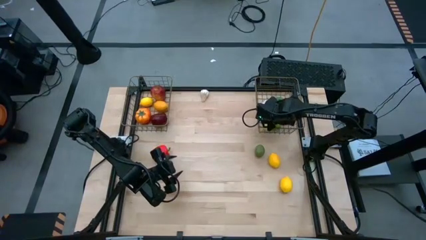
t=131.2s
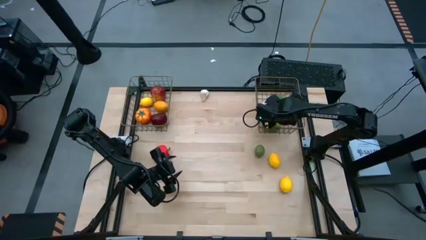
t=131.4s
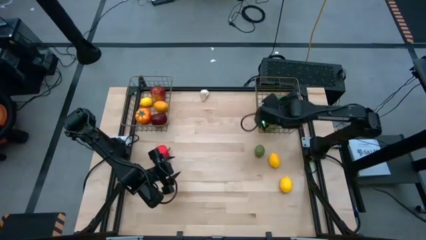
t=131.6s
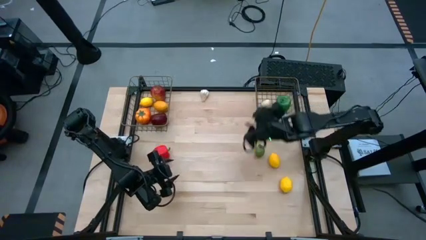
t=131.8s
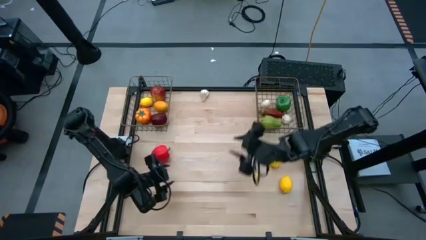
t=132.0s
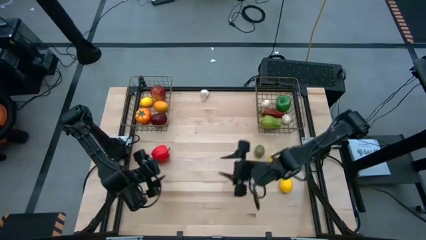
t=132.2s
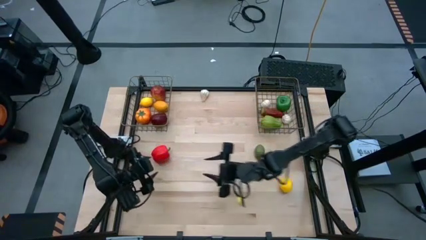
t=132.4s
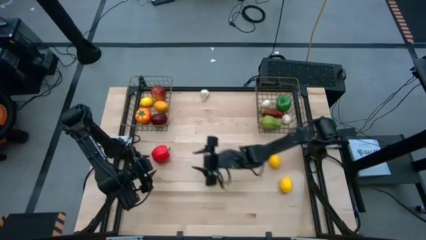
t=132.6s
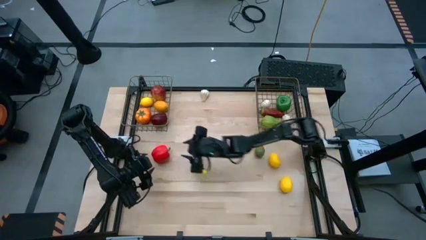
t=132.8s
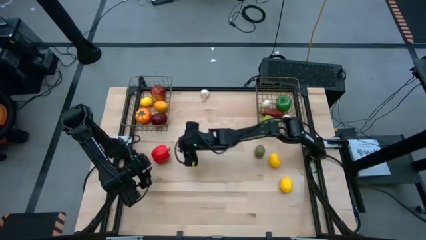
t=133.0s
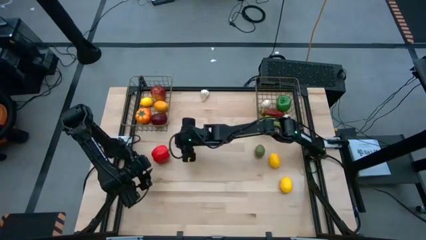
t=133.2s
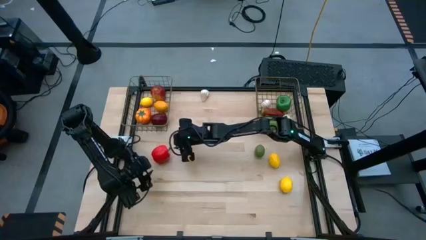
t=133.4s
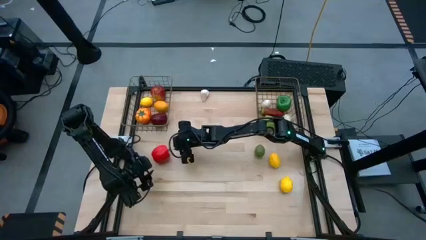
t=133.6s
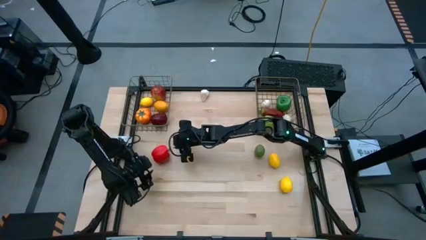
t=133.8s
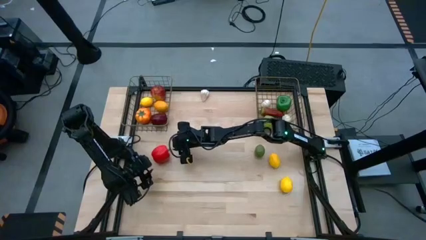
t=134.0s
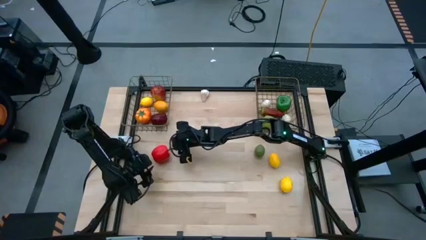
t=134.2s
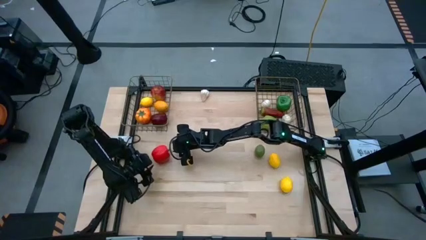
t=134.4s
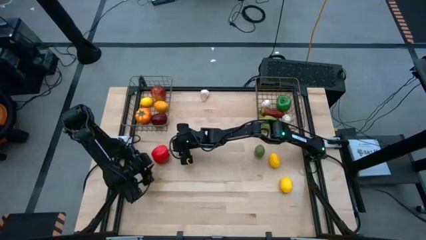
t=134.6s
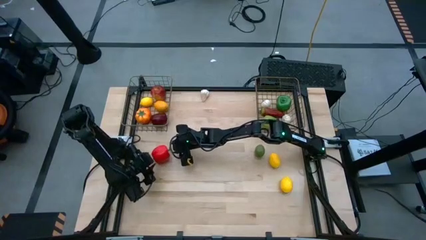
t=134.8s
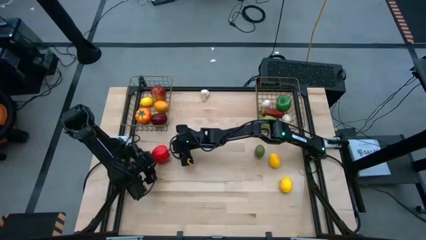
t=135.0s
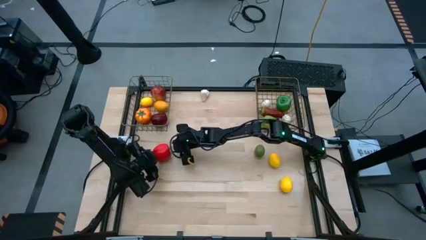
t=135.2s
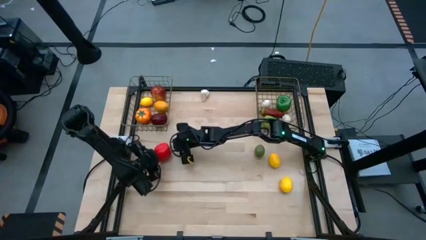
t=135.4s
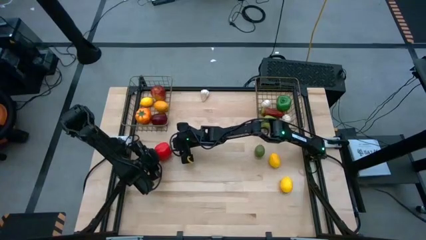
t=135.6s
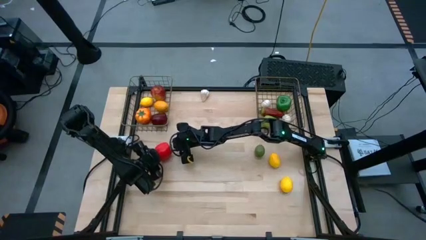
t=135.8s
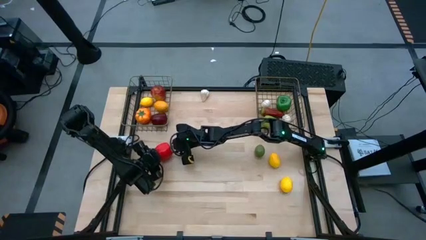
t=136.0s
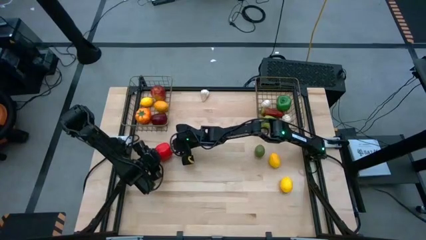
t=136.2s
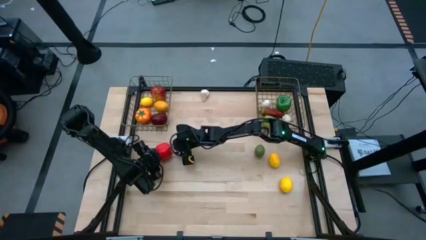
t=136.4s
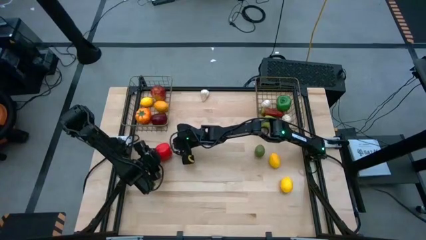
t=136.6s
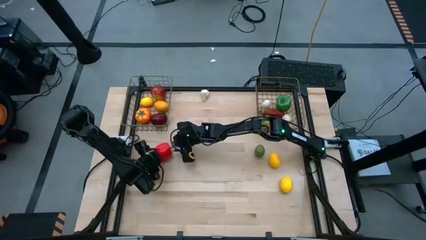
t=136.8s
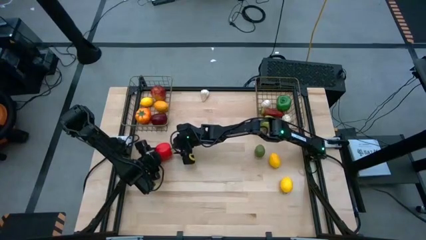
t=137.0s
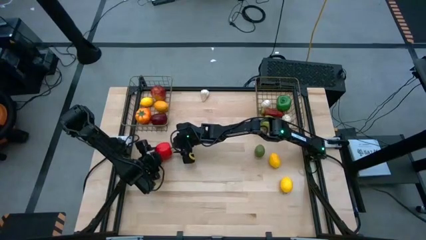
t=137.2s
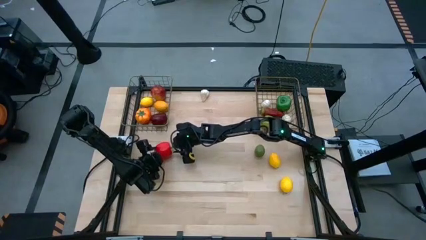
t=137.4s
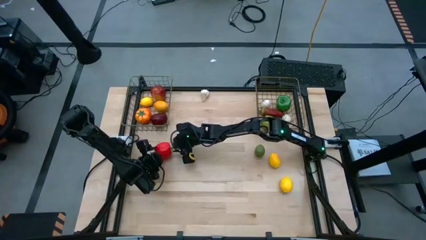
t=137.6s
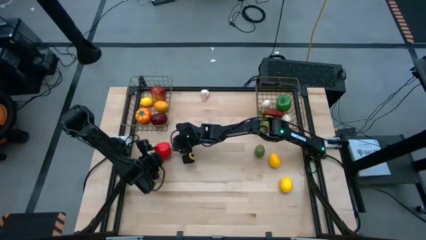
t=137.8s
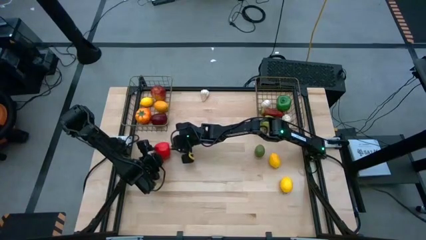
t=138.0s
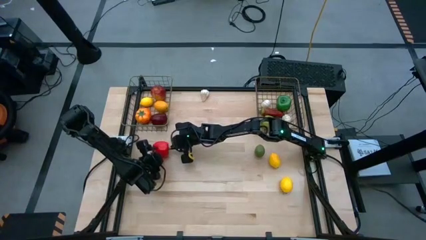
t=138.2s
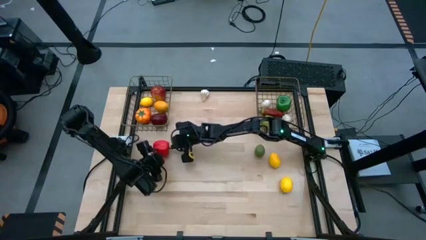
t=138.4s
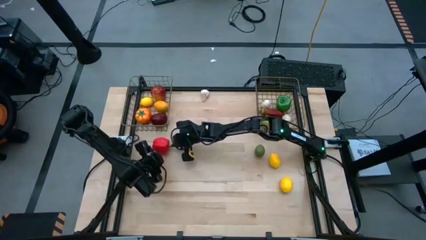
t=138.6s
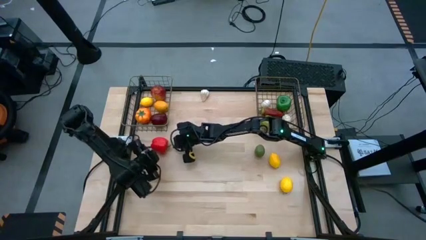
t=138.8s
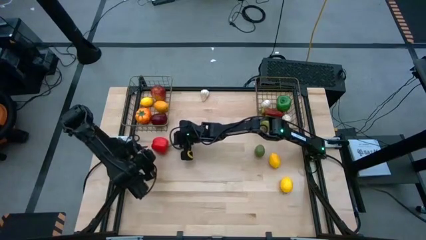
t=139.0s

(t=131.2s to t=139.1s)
Task: Sort produce into baskets
Put the red bell pepper into the right wire basket

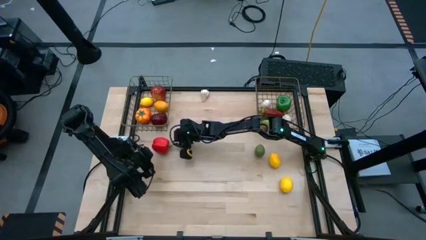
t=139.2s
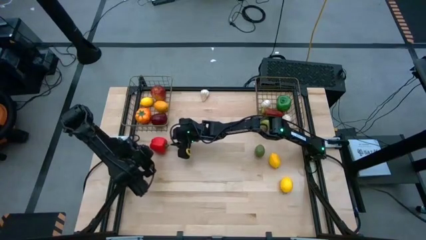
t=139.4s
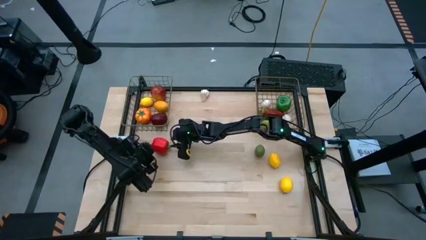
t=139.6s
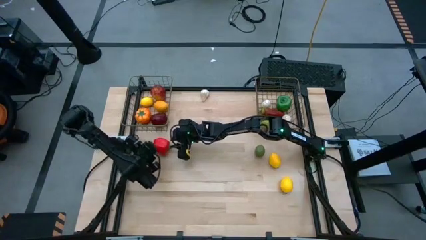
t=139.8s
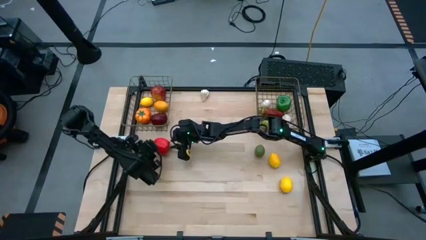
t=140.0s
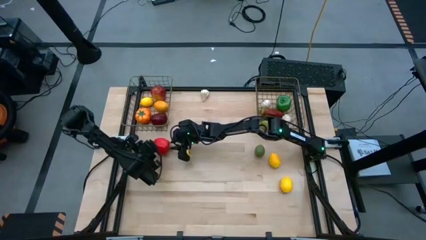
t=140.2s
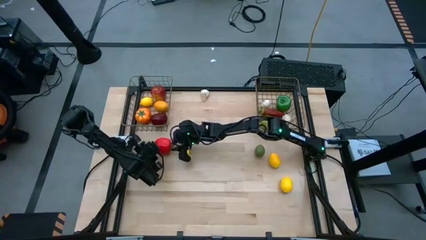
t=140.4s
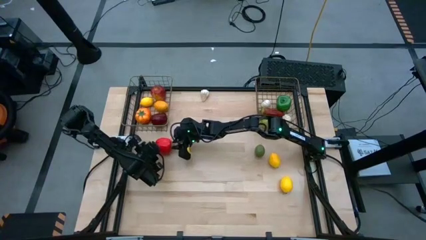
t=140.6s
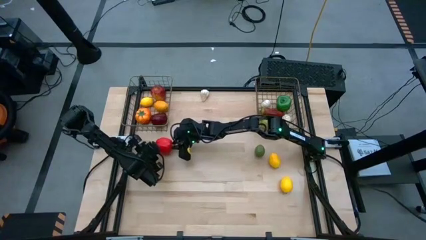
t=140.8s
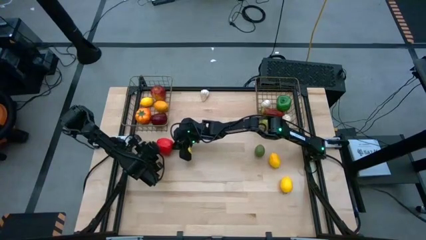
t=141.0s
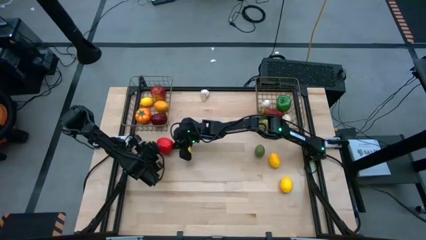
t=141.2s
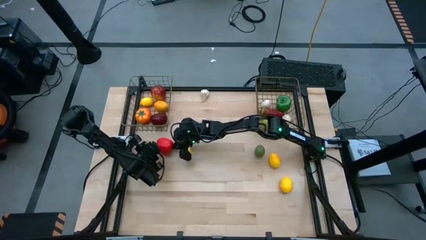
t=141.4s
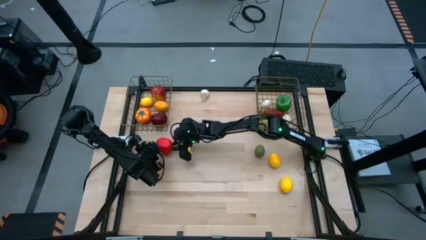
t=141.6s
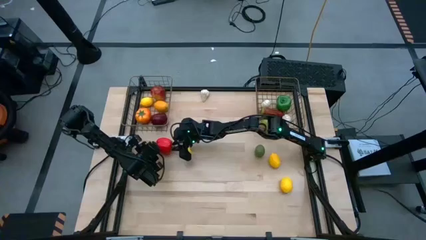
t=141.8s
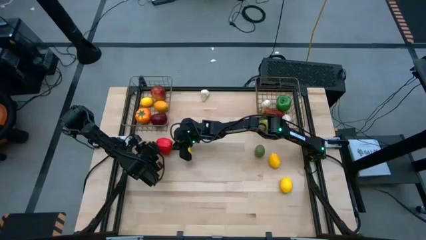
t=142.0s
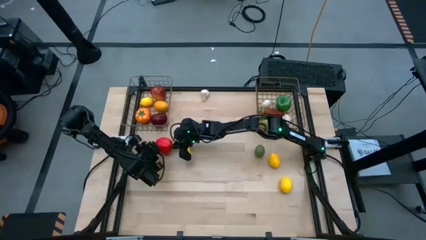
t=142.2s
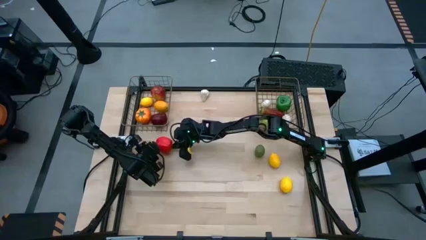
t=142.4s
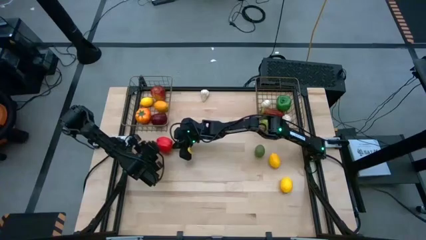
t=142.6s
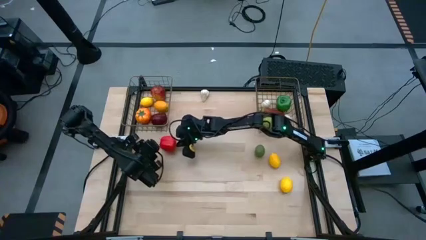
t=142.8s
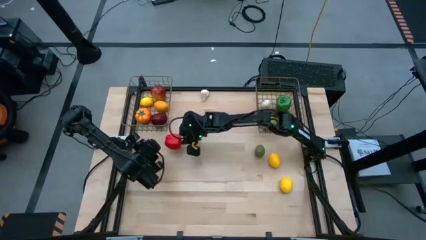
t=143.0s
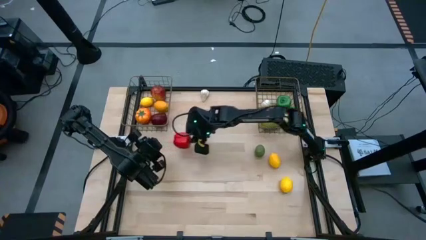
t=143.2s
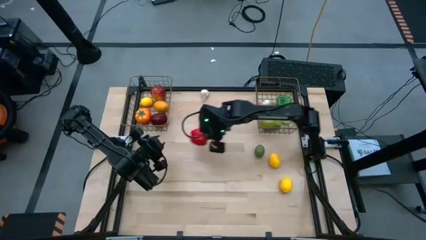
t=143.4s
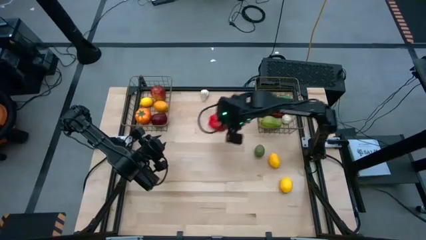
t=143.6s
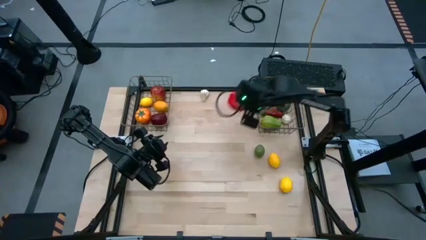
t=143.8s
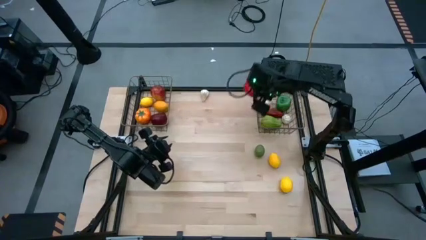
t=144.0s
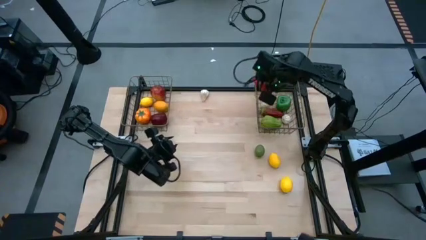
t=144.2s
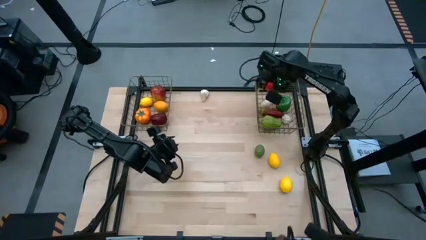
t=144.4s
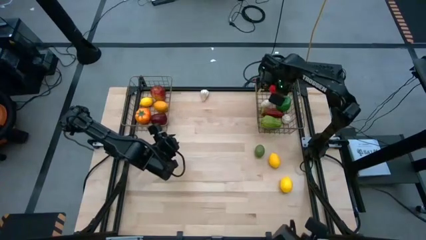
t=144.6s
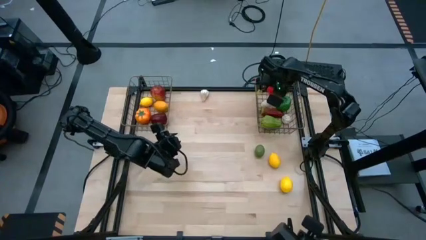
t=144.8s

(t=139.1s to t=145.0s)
Put the red bell pepper into the right wire basket
